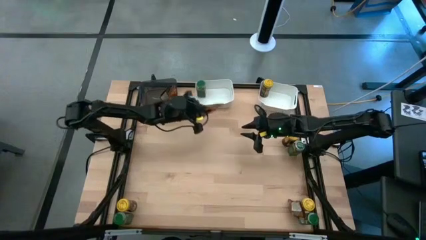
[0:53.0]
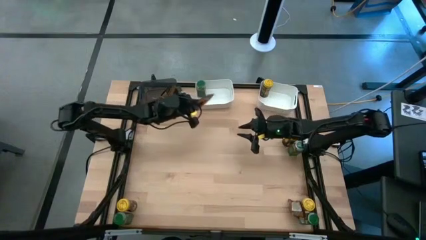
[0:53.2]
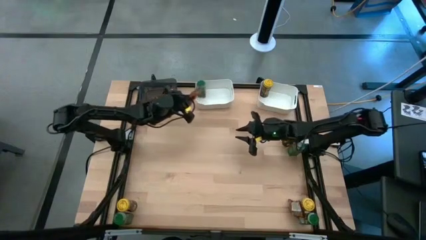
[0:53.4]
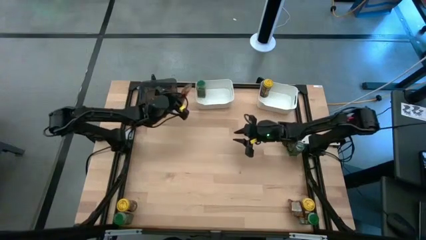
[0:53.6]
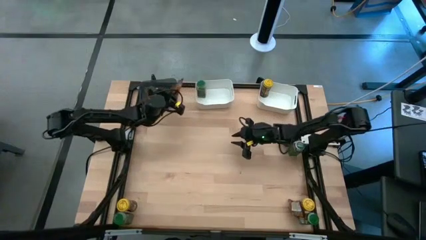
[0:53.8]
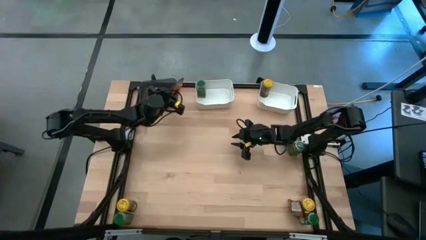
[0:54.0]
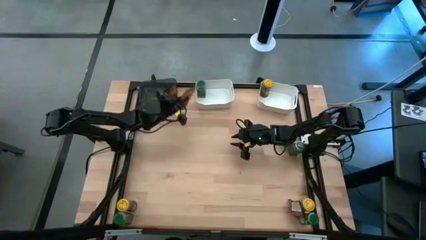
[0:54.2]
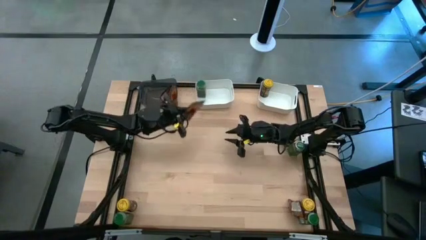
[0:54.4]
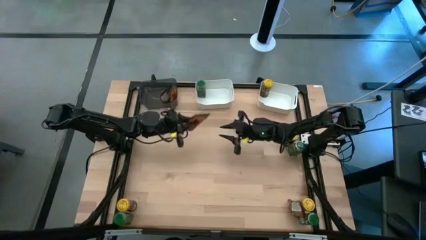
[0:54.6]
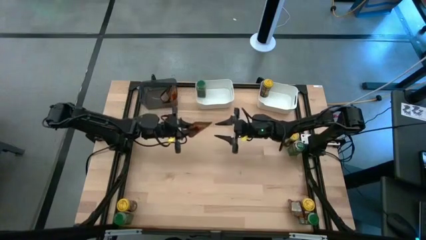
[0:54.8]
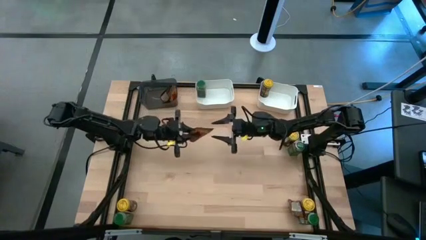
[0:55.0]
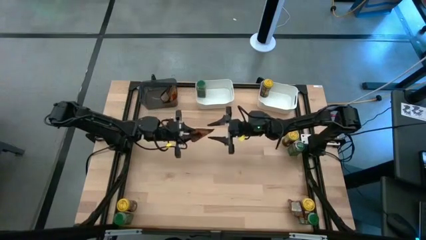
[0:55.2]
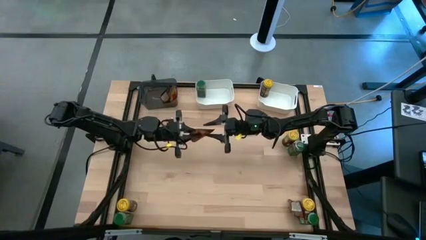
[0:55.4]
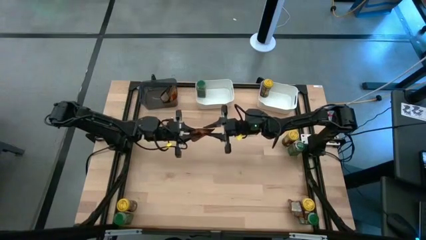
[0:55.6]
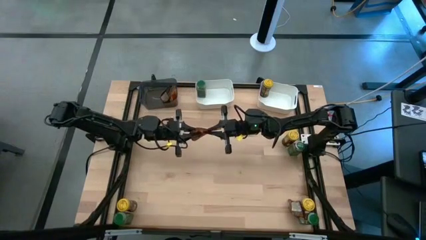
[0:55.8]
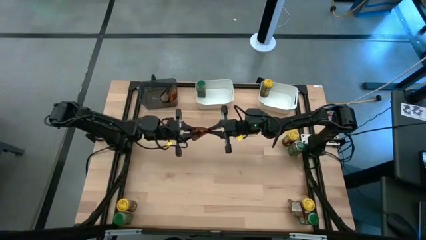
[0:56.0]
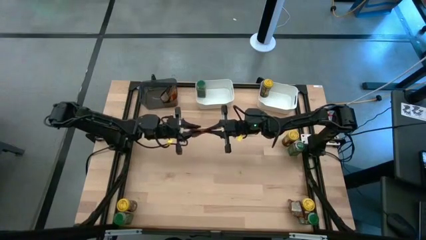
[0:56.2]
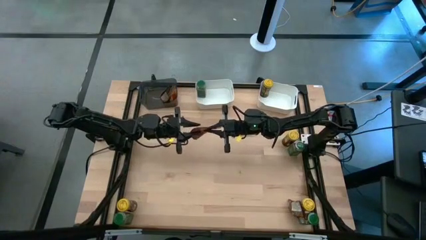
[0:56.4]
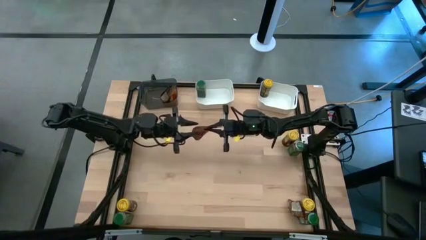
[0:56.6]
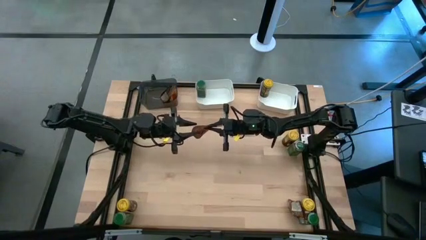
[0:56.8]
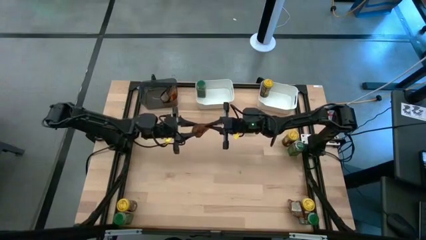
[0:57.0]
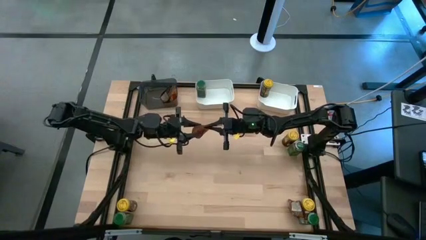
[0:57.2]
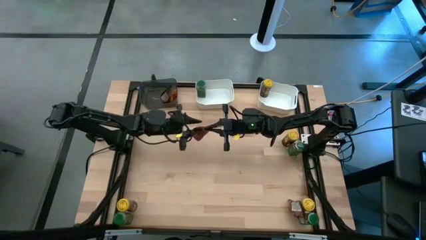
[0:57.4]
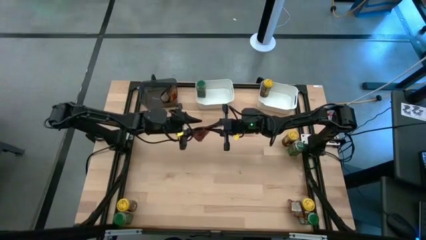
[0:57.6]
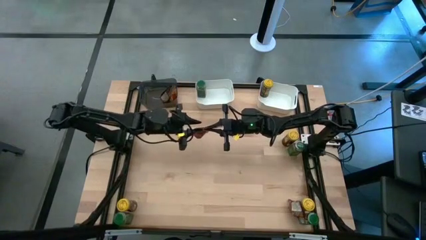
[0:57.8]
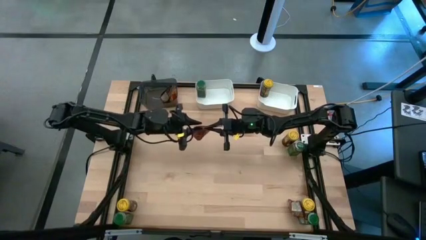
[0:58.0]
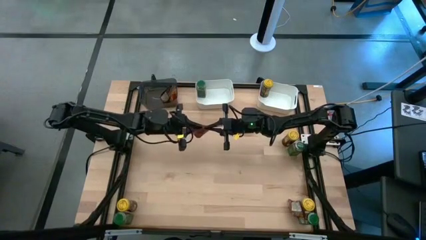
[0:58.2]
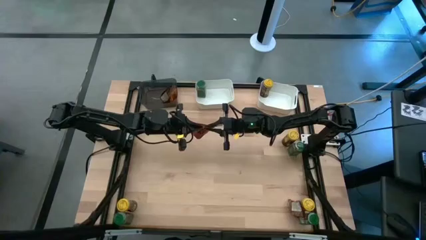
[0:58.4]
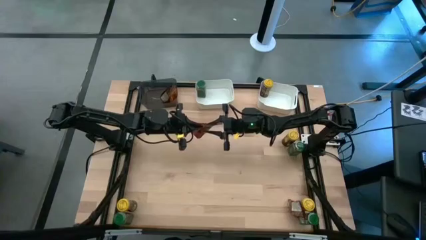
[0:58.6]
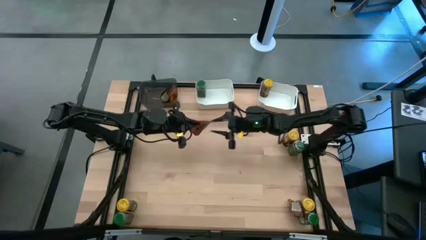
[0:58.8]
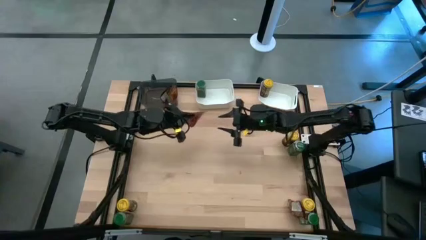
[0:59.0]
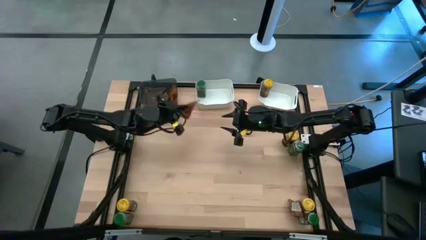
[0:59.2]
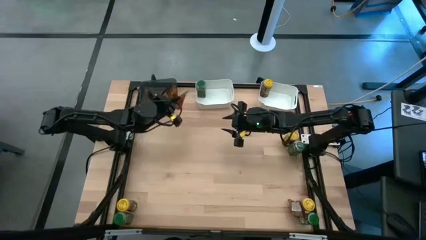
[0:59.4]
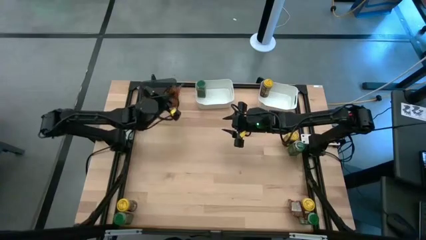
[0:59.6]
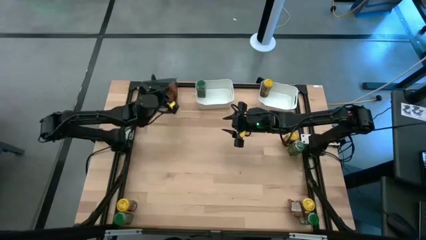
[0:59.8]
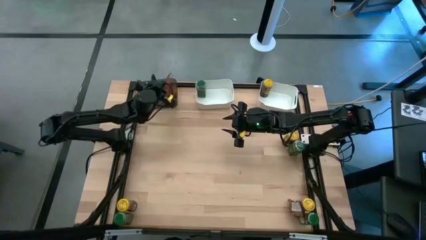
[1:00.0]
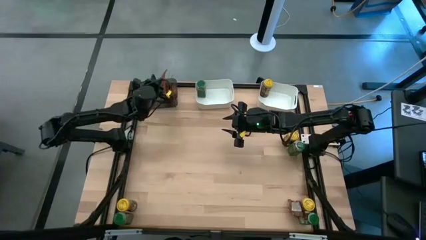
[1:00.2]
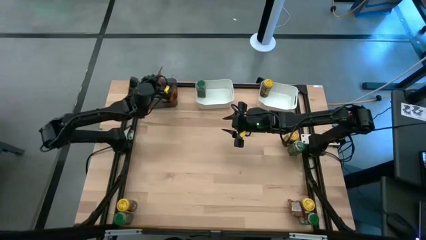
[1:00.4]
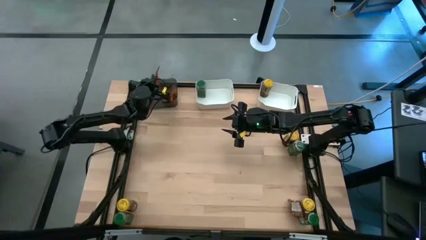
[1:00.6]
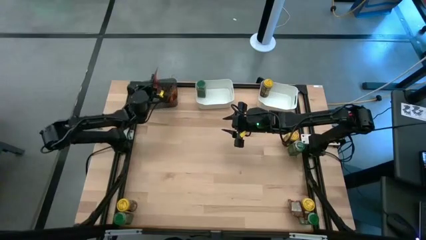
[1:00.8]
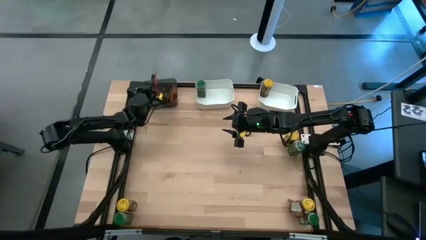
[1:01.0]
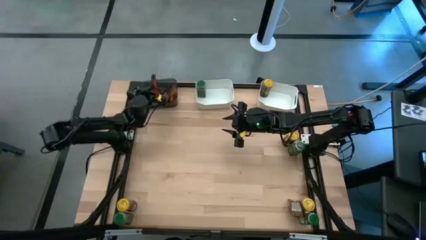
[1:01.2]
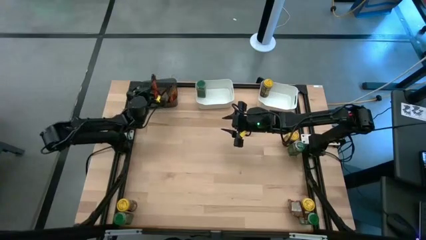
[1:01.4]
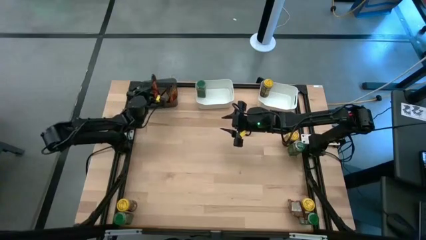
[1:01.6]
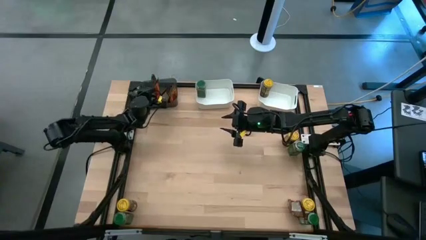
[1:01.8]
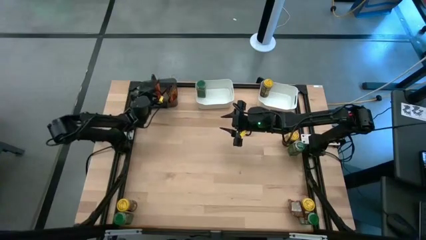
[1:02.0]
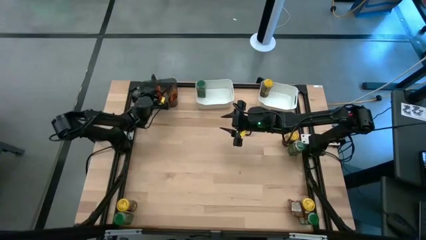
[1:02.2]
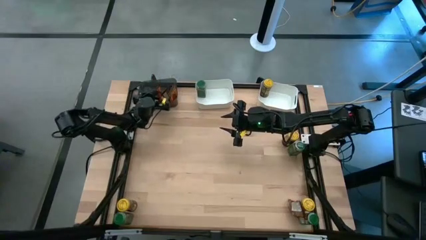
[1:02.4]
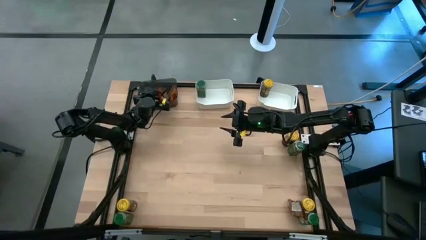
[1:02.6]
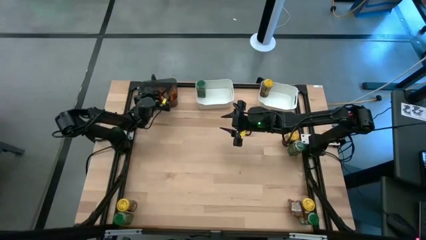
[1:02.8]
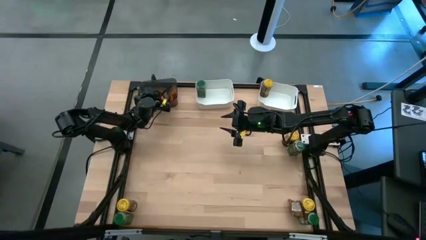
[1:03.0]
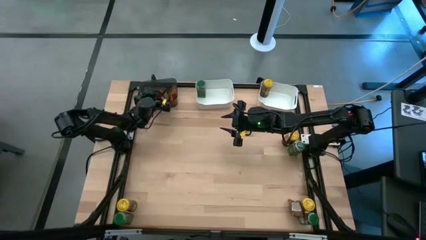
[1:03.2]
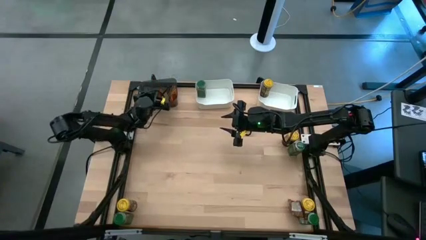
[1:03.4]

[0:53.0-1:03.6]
Task: Sort spices by type
Put the top brown seasoning bag into the black bin

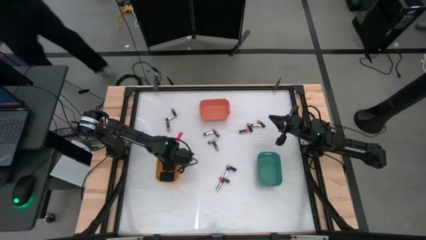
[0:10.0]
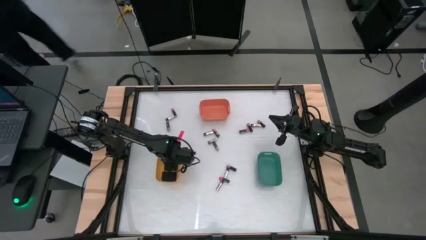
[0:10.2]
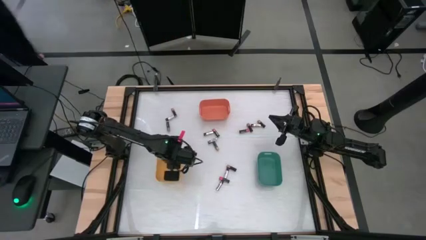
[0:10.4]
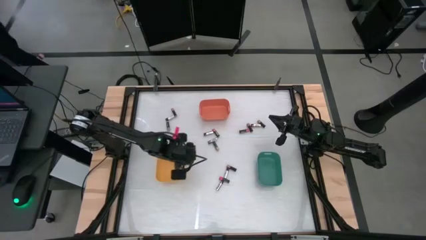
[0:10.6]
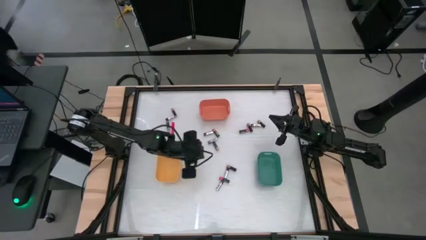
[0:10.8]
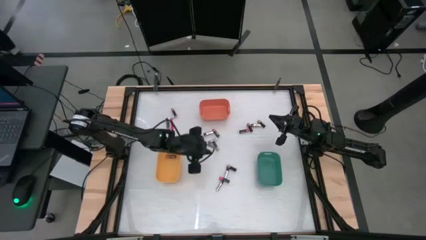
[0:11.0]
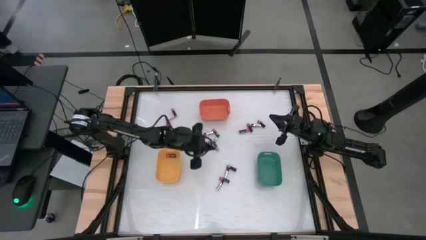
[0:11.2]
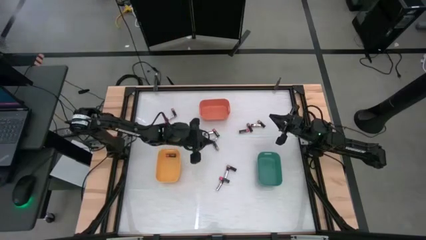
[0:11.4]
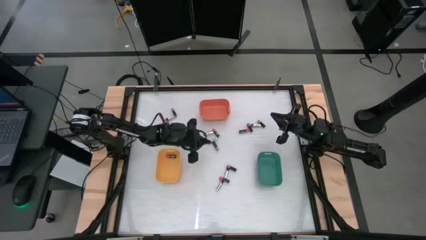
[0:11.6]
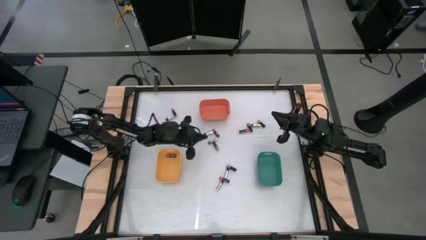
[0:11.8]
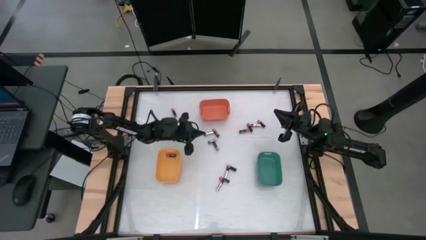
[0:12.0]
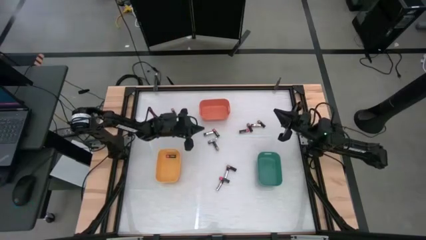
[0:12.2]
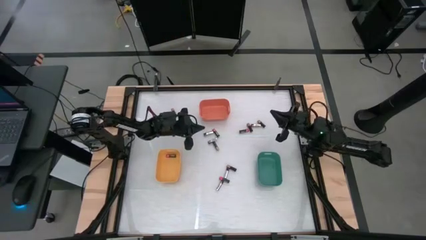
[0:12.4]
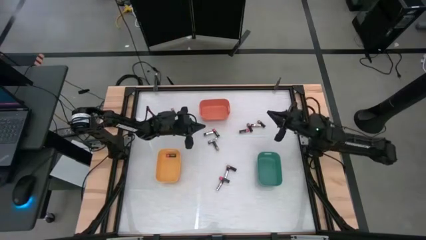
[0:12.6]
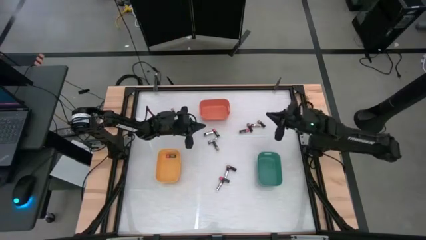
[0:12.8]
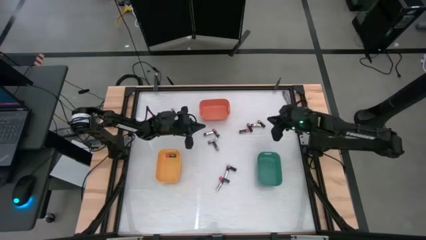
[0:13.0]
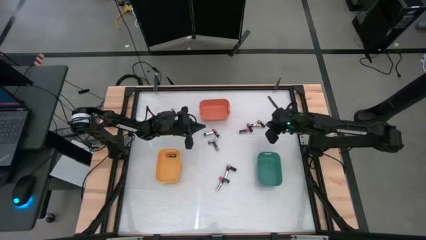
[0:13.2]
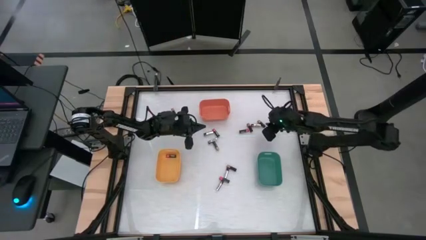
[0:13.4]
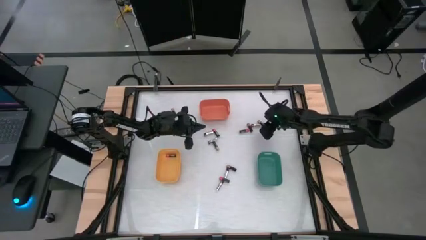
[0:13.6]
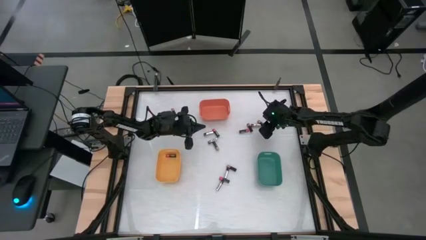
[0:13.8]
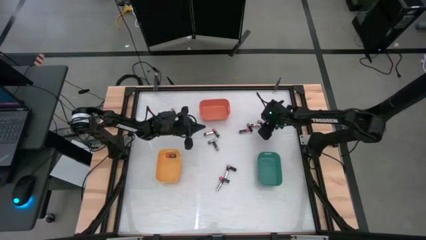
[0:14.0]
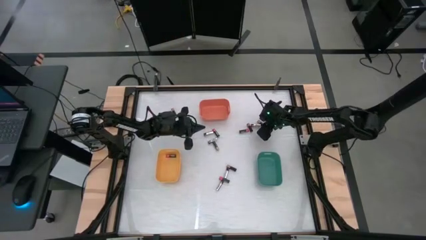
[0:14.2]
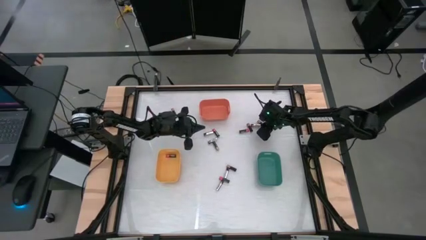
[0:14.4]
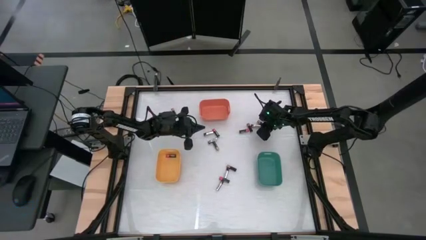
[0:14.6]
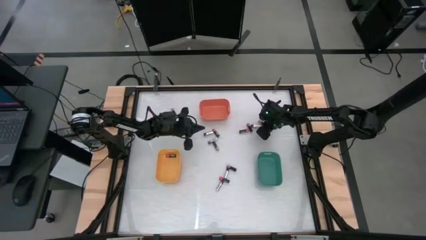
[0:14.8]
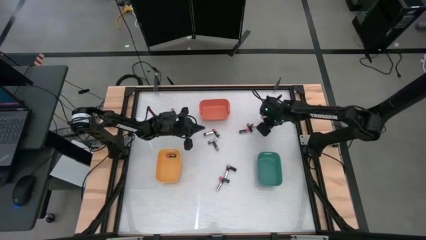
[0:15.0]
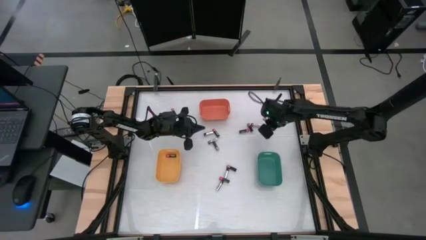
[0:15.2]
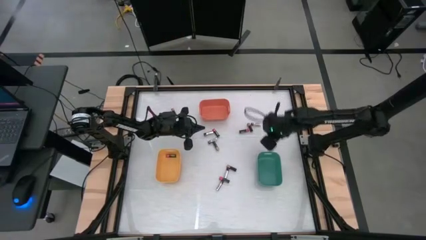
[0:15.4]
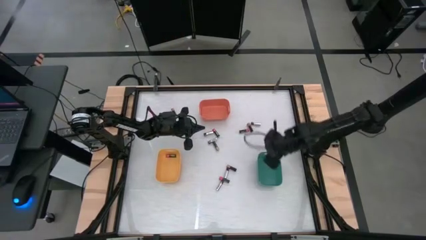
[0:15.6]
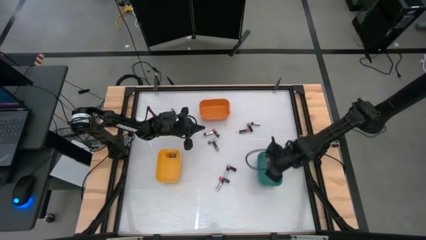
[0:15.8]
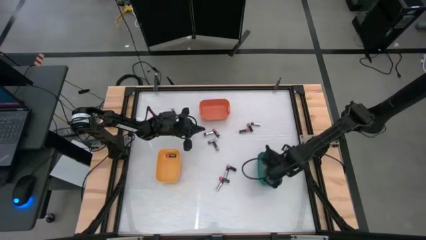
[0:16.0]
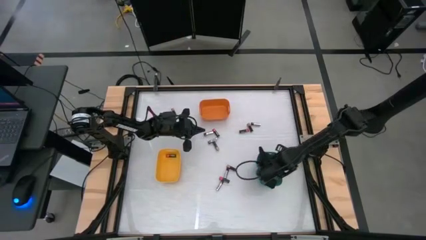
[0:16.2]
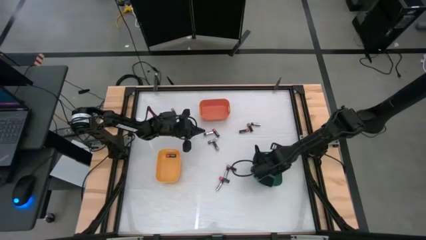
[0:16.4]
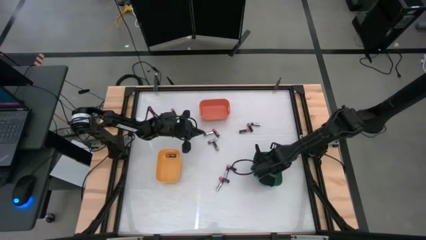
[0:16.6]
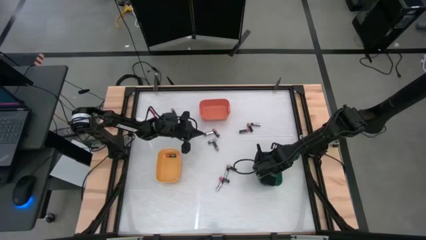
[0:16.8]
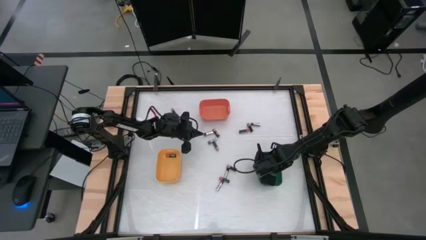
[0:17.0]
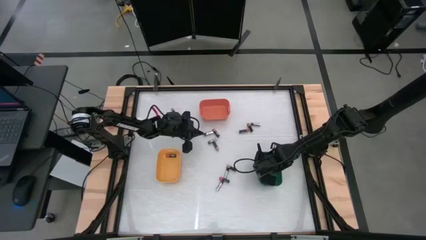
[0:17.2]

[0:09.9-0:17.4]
Task: Sort batteries
Put the brown battery into the green bin
